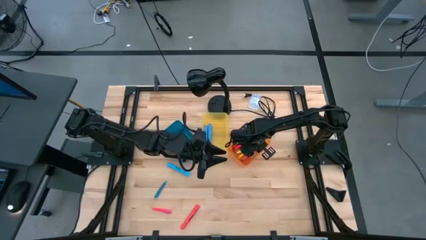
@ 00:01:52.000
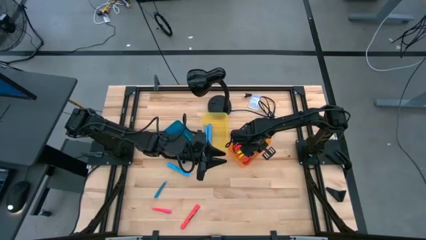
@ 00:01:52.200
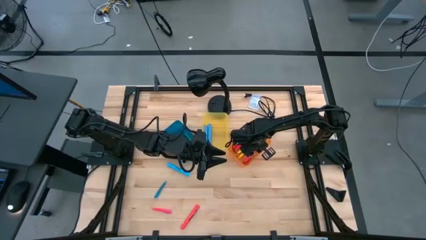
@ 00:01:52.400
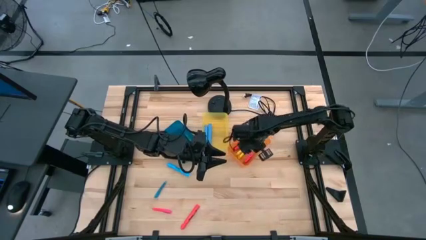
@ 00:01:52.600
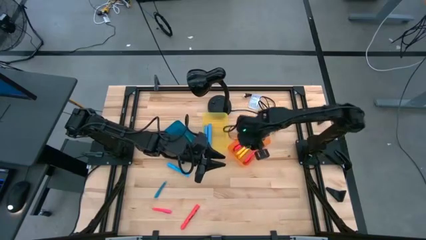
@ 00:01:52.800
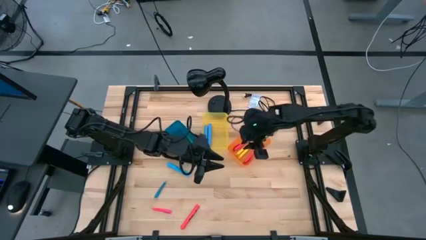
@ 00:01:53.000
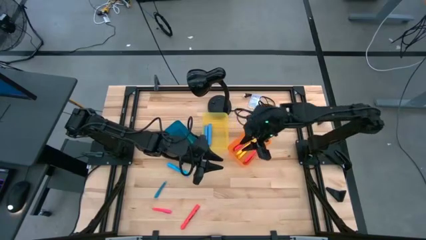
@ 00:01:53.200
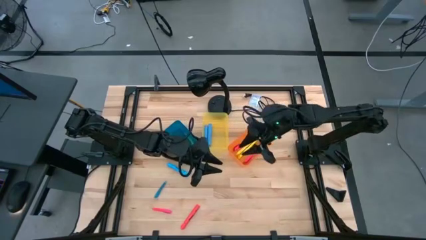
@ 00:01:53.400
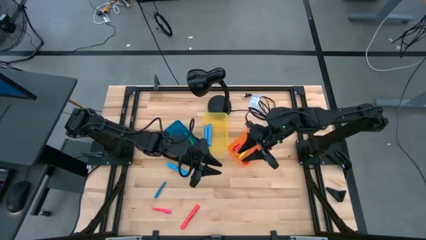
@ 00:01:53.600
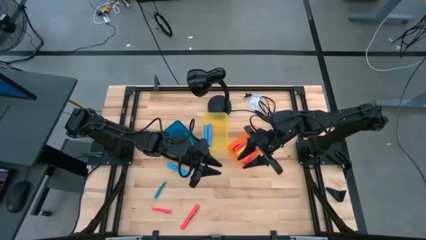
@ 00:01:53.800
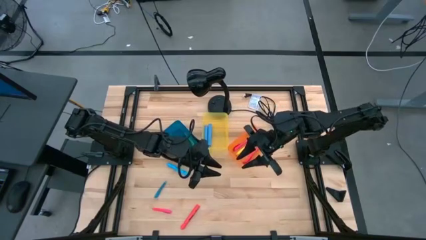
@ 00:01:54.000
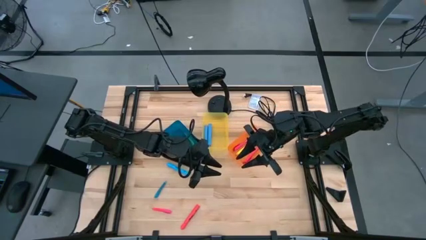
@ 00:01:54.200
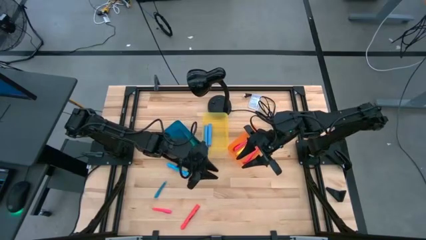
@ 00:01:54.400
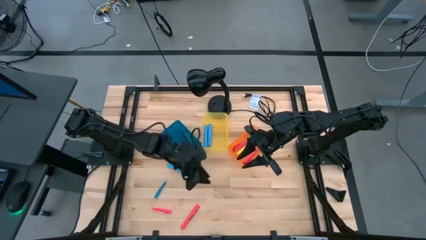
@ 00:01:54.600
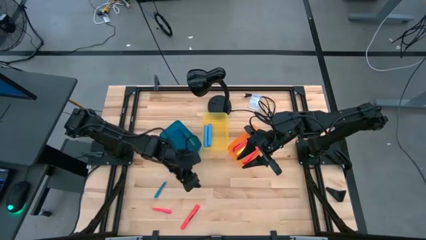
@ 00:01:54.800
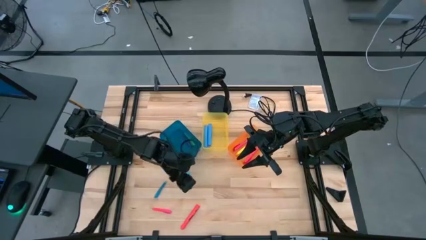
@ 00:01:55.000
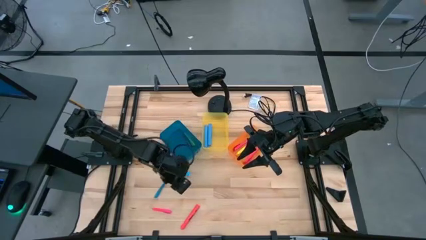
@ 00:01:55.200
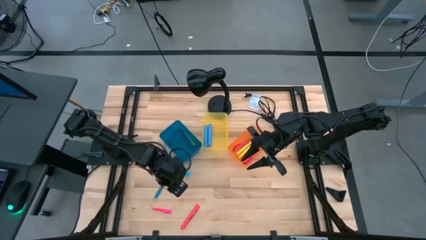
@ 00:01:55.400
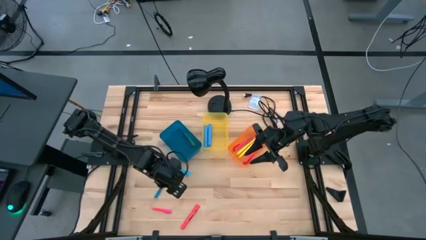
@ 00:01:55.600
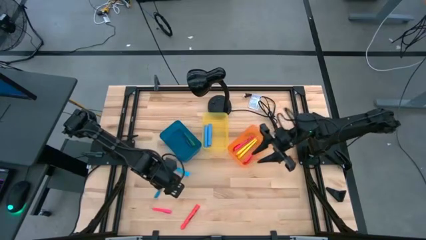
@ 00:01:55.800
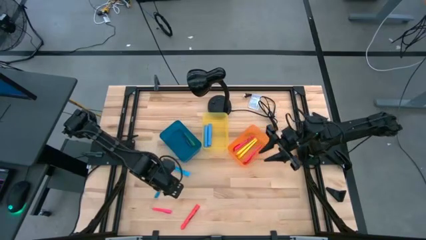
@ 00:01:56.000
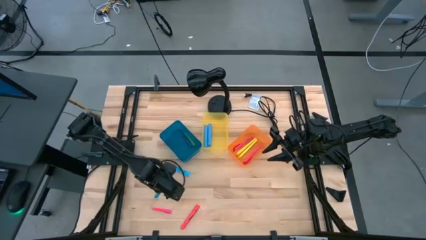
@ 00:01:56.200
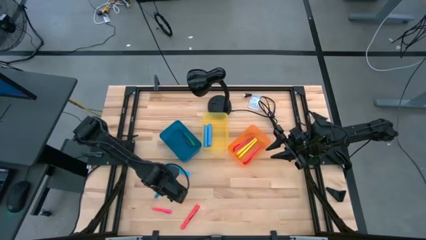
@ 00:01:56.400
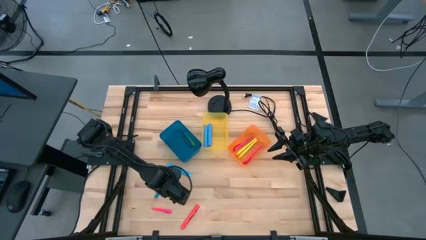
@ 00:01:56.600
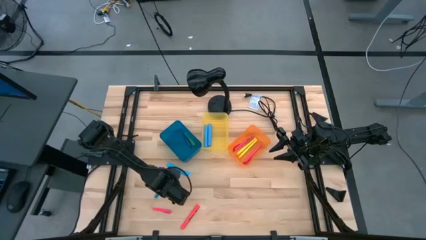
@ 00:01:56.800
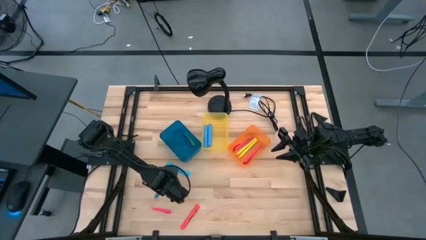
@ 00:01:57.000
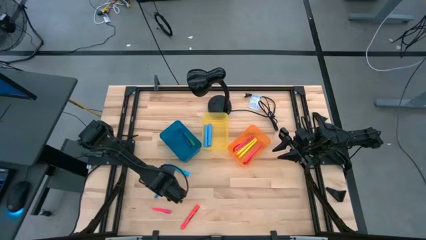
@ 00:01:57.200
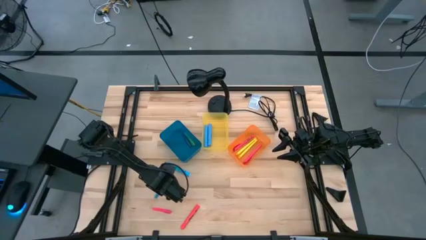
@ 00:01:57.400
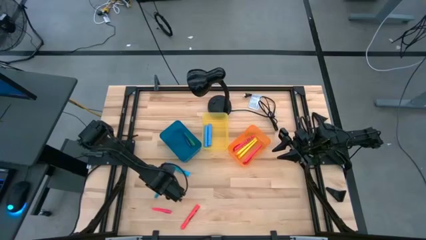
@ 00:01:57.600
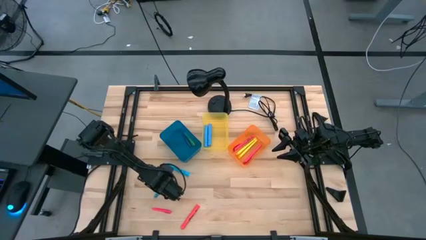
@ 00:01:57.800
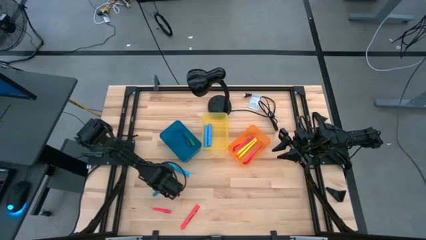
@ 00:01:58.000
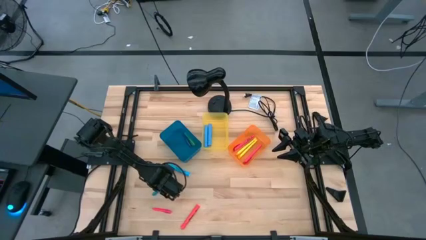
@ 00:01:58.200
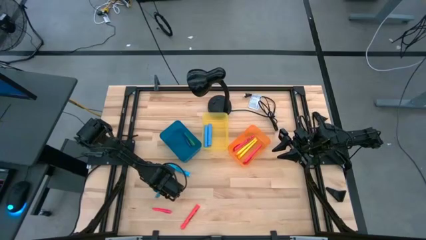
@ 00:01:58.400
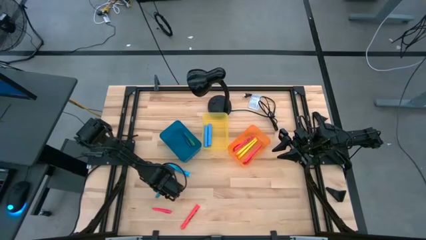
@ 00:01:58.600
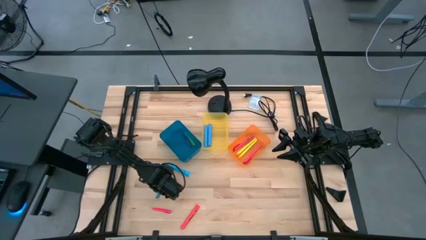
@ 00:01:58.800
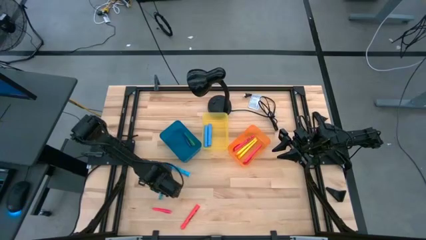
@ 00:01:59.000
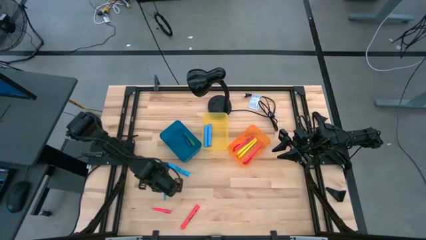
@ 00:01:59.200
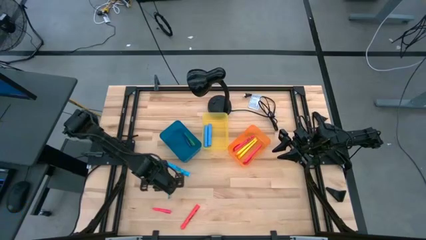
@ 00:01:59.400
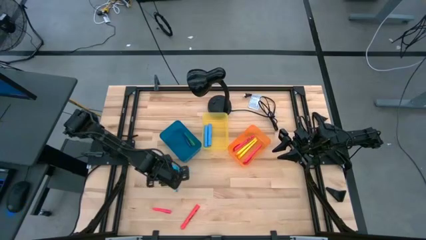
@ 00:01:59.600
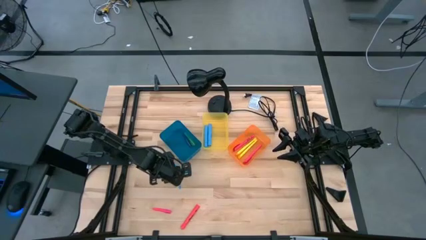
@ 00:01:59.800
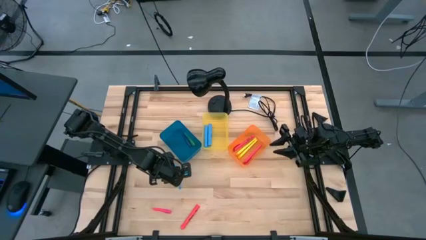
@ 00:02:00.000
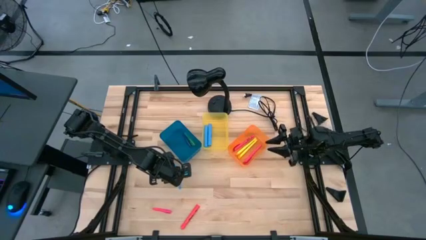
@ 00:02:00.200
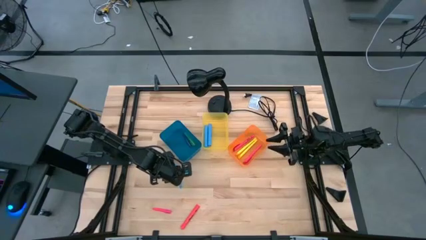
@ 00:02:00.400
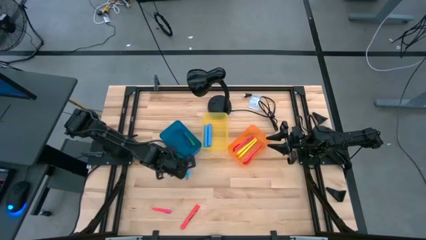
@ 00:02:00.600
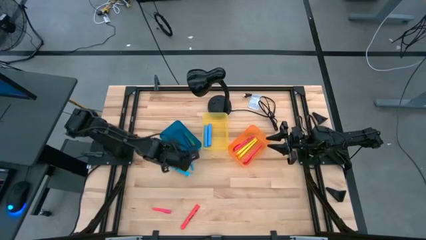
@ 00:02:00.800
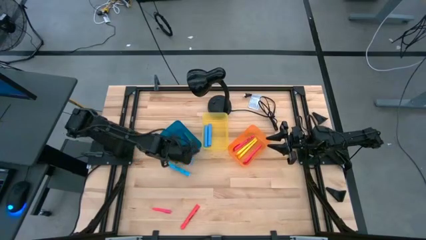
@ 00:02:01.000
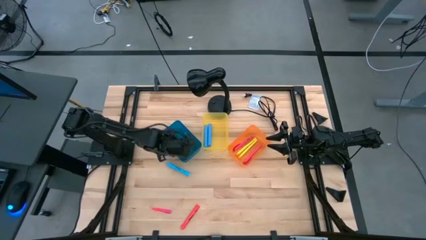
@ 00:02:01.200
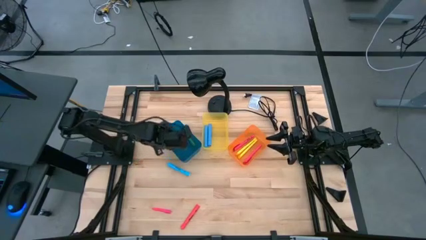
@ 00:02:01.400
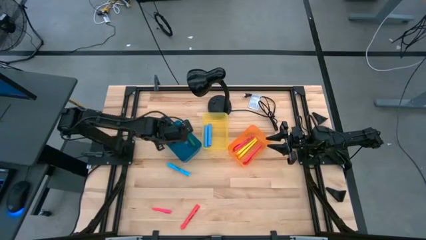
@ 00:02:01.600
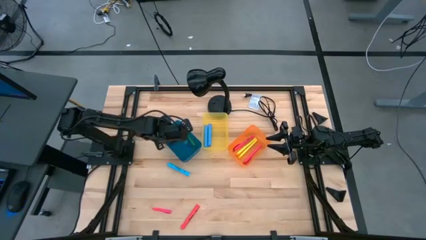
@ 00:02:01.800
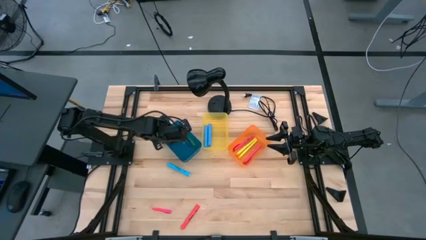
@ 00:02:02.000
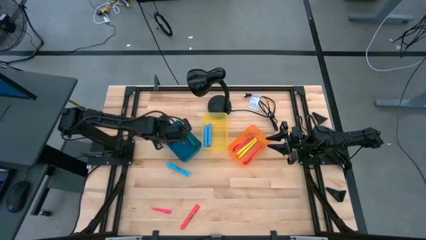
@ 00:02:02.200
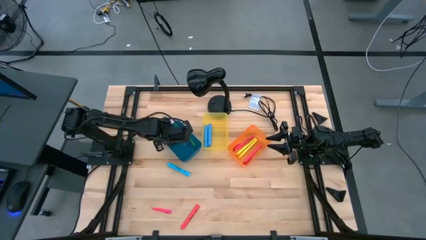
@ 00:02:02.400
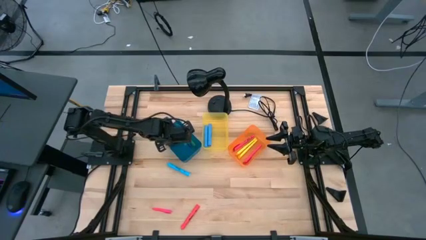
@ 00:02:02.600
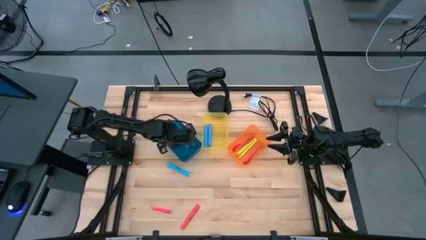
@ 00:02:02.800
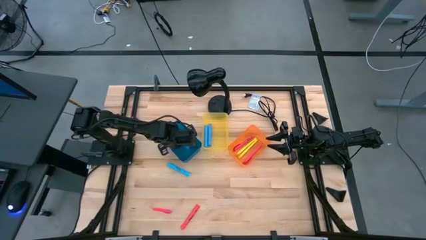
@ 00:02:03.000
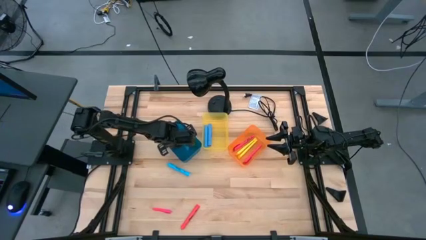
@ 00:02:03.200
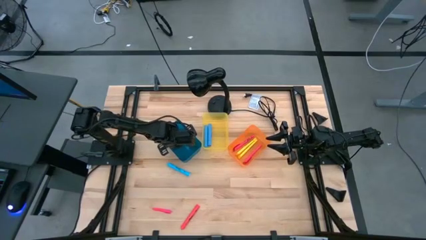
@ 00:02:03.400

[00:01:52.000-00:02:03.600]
Task: Pick & Place Markers
Put the blue transparent pen into the blue bin
